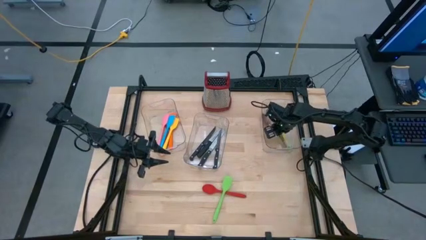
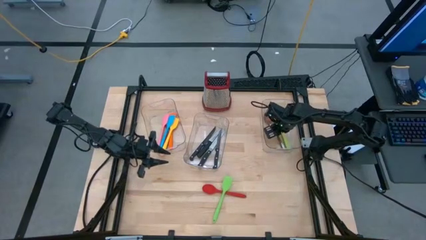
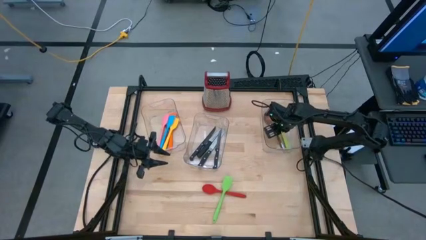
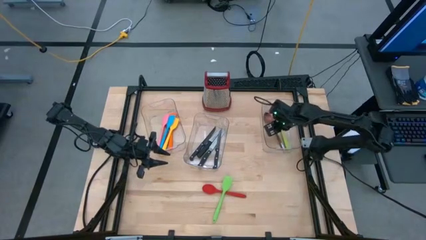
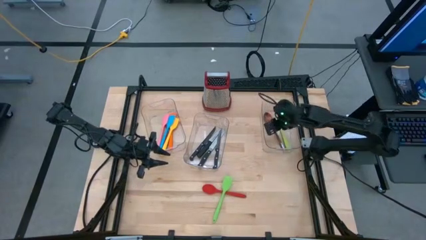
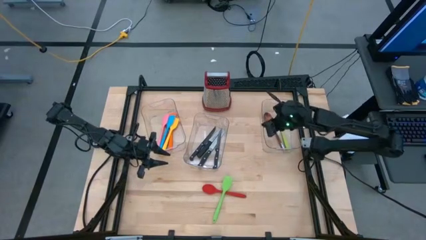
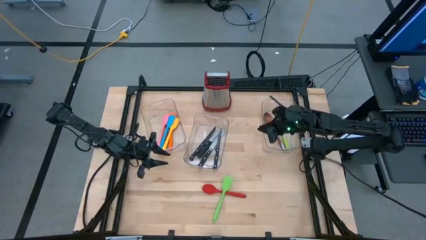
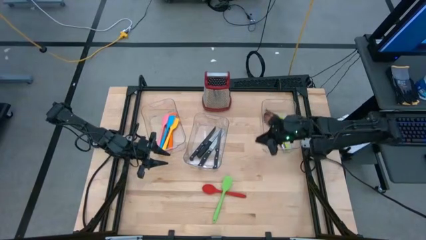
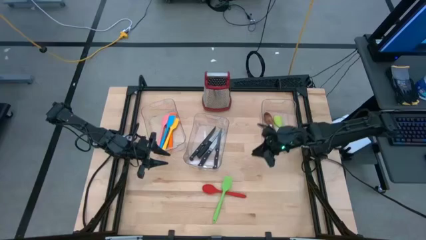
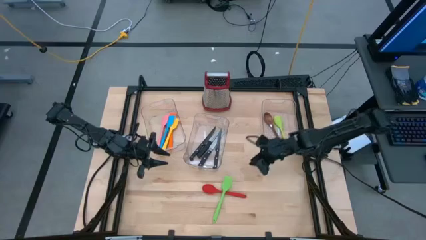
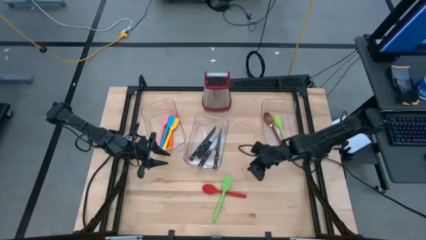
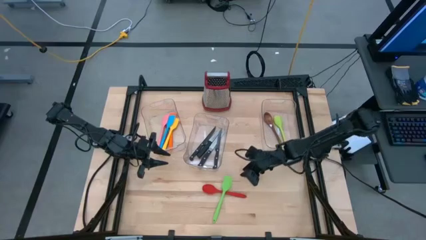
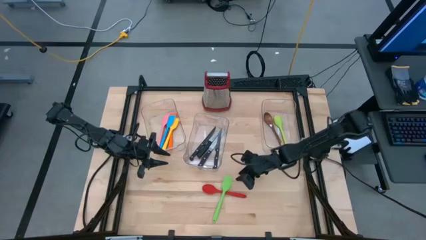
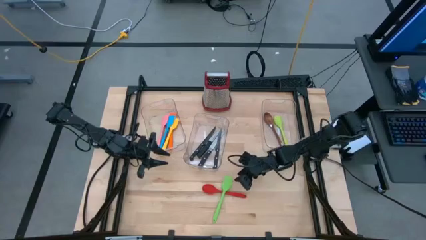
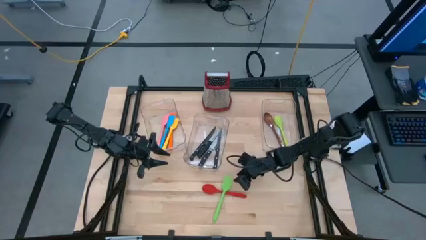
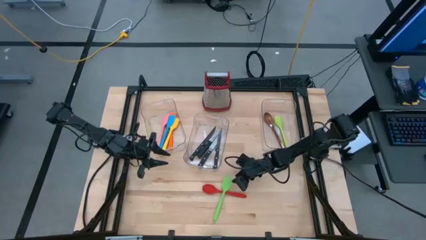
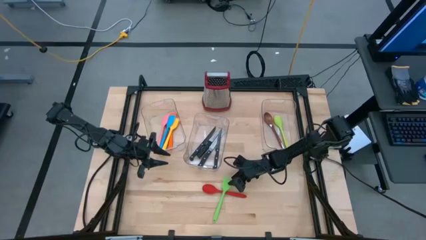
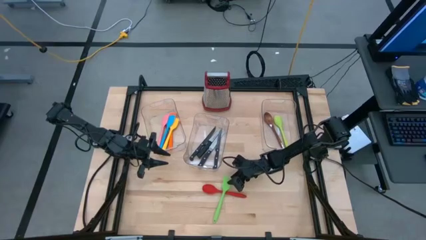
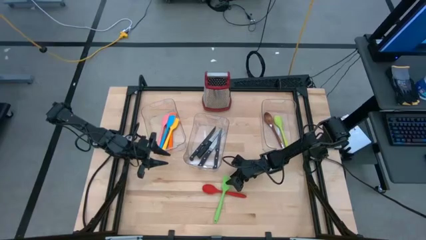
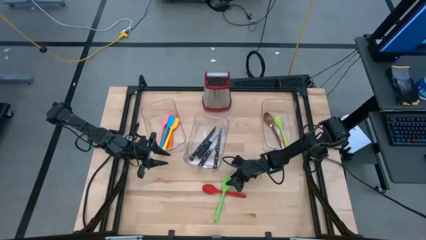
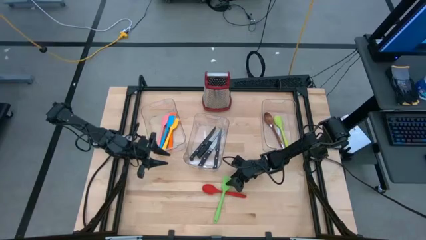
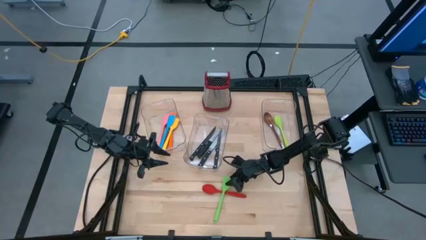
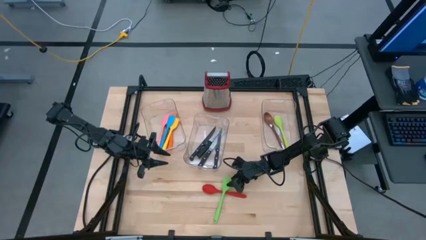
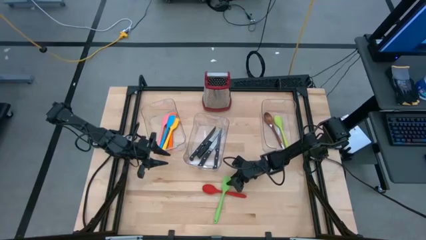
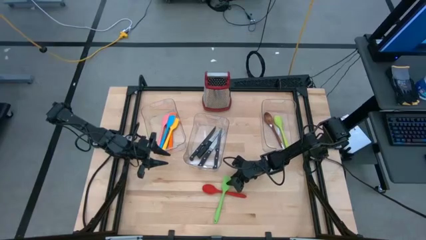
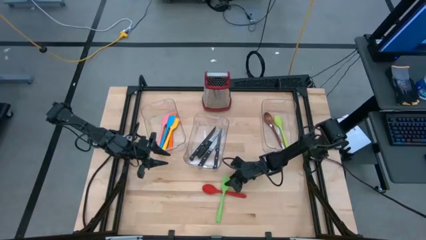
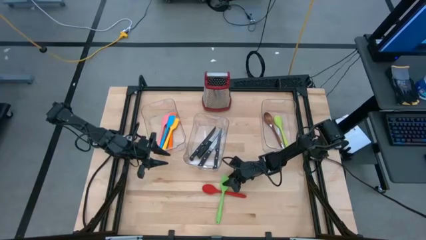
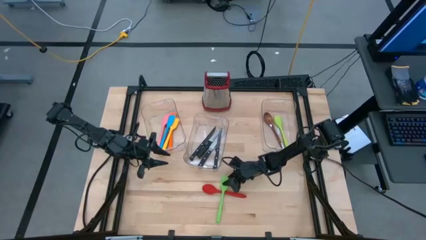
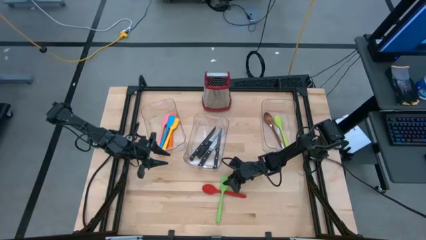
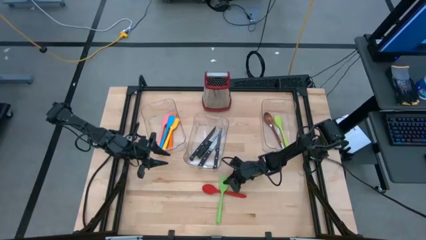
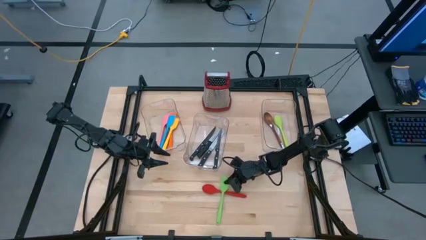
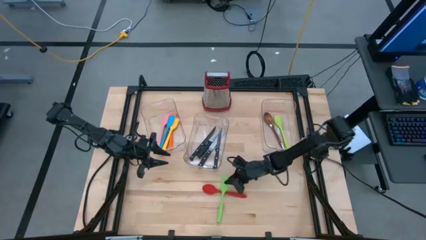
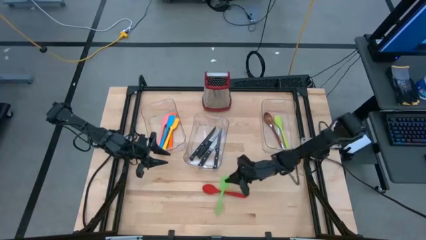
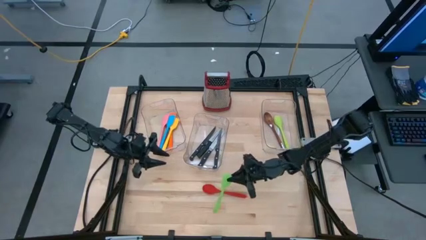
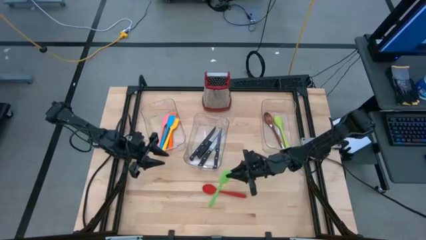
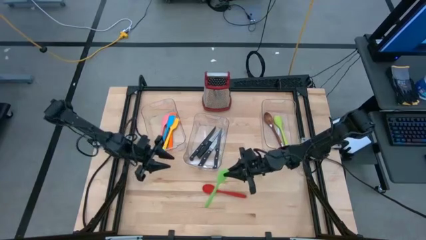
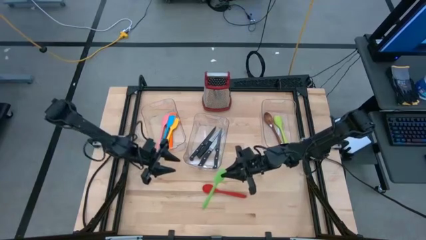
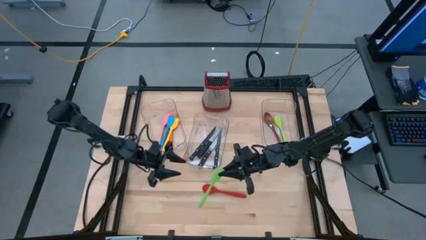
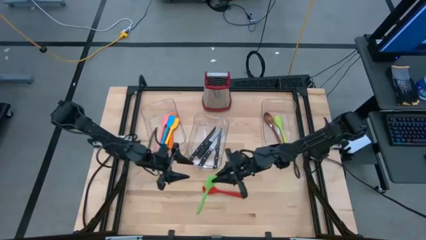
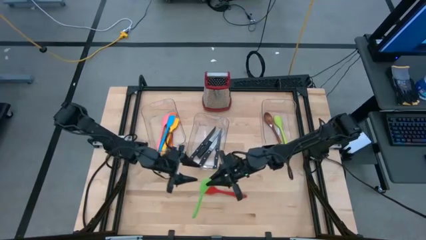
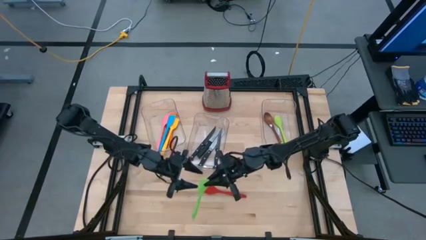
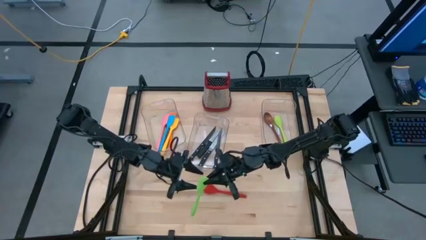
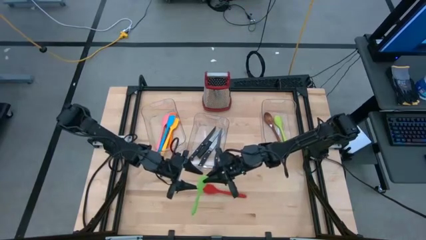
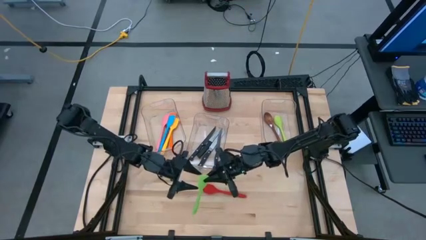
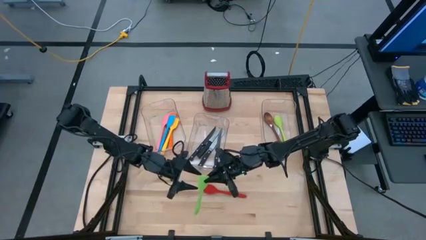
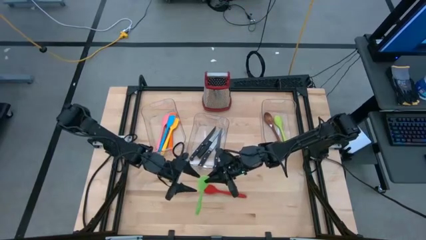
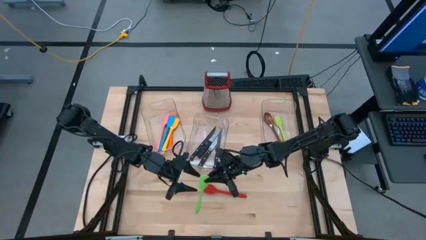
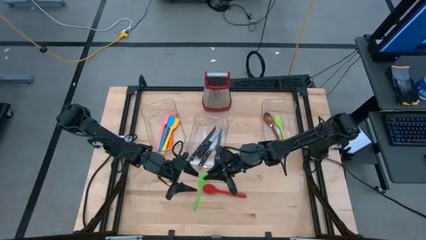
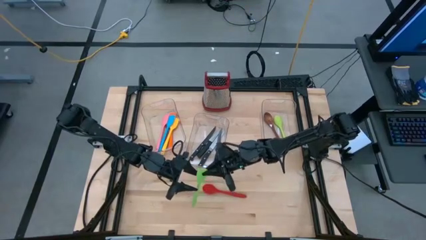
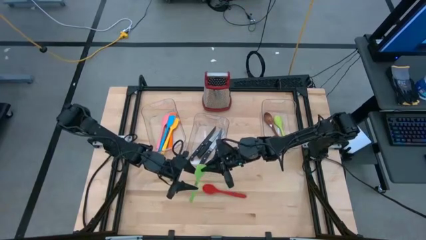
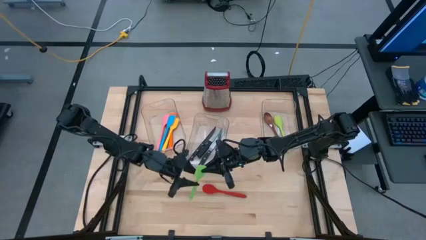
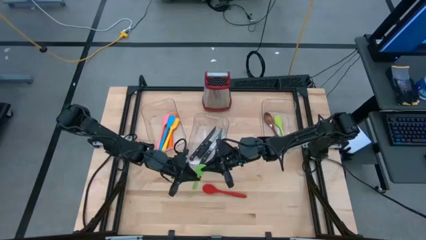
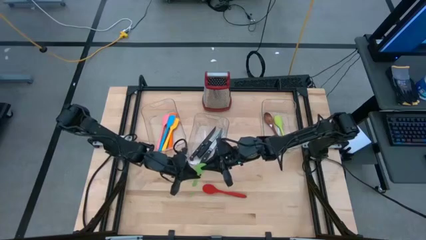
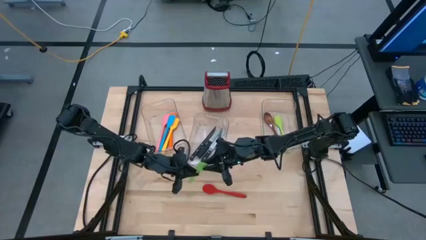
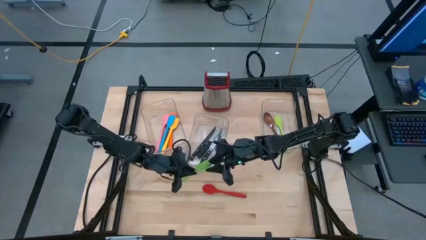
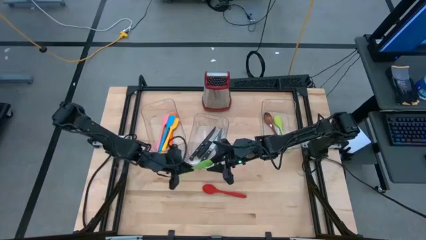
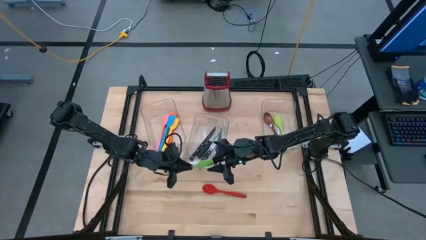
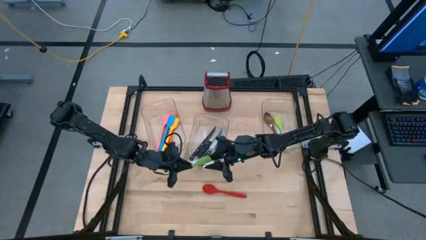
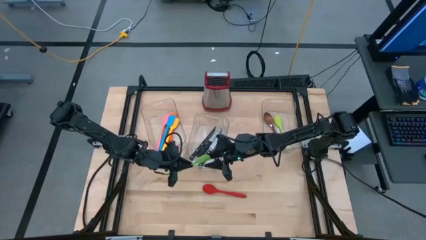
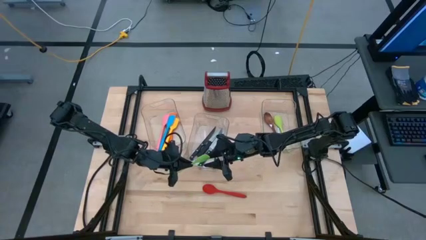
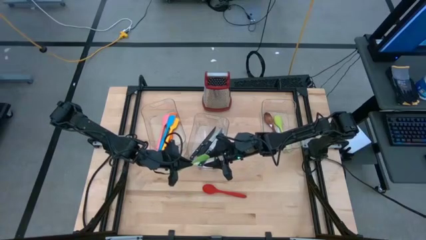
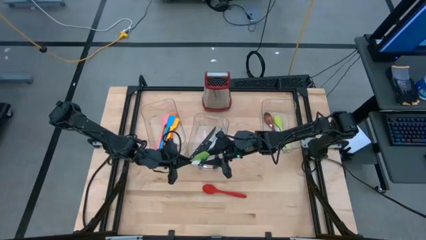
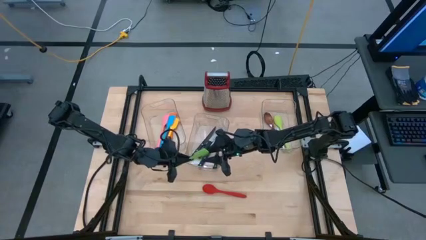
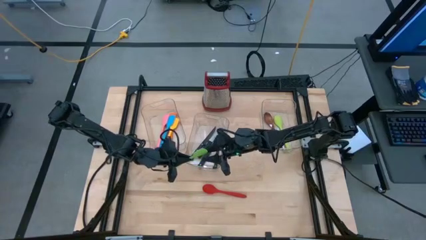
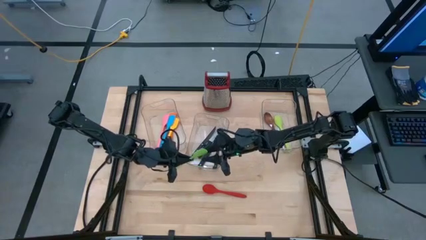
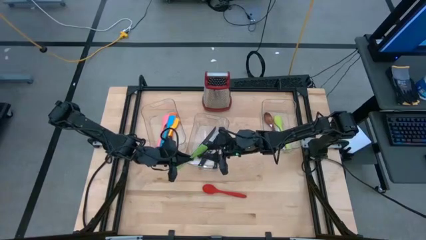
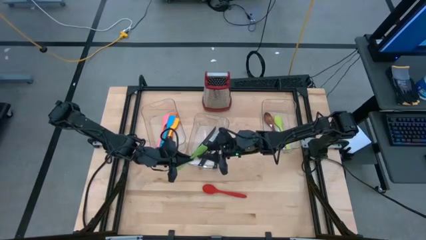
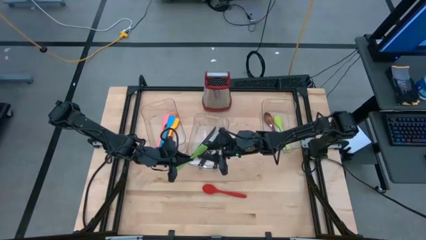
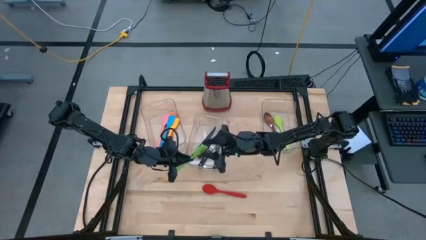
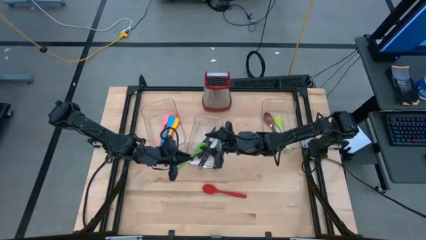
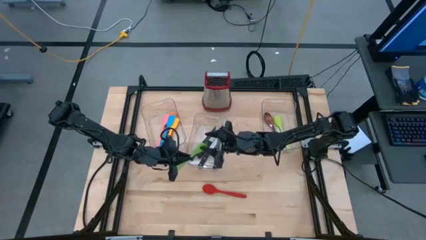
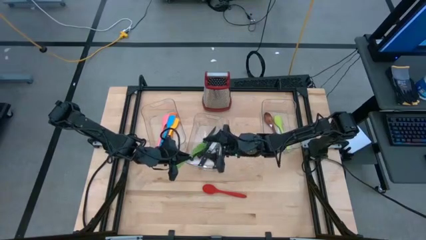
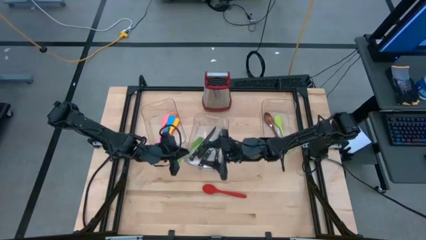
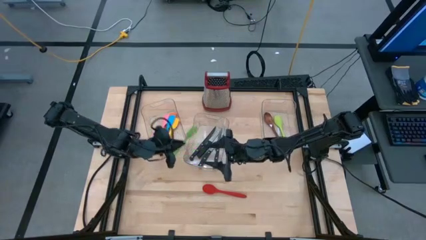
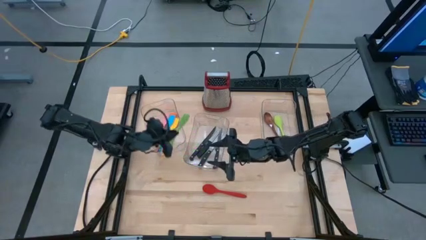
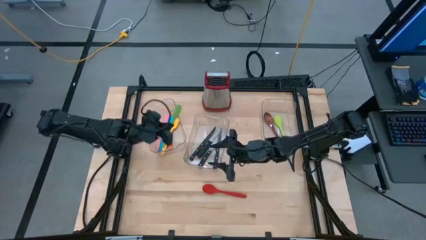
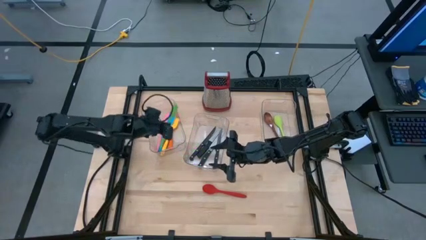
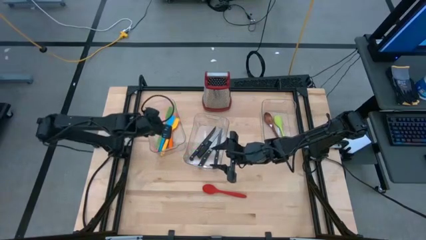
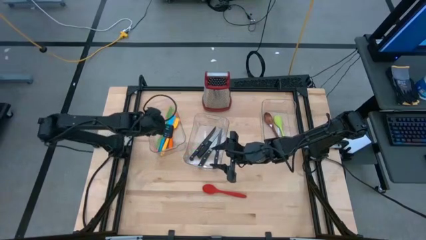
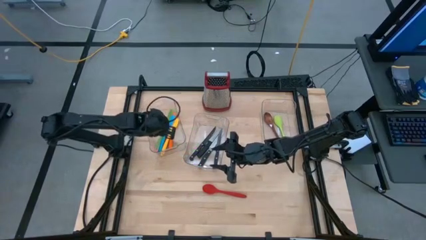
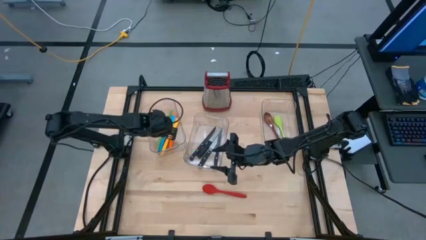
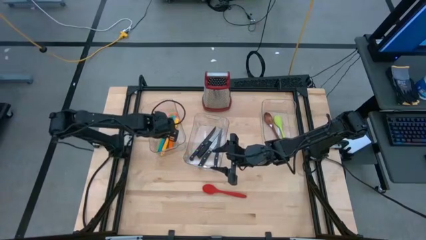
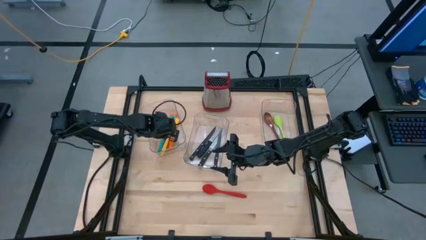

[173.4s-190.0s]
Task: Pick & Place Kitchen Items
Put the green spatula into the left transparent bin
